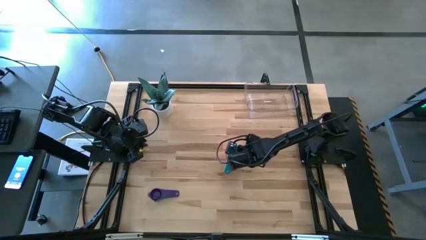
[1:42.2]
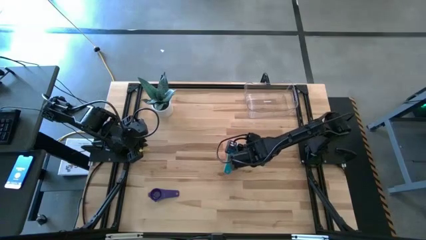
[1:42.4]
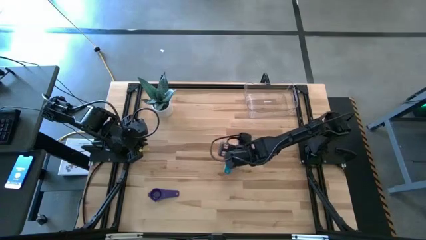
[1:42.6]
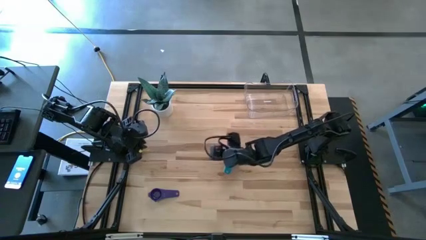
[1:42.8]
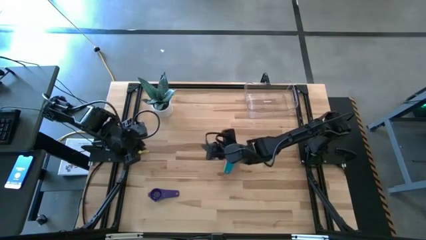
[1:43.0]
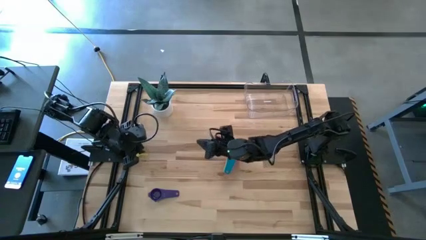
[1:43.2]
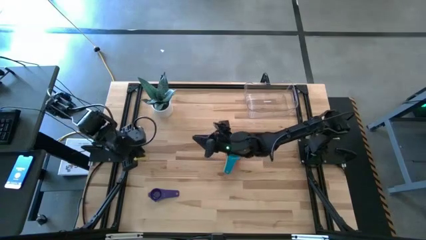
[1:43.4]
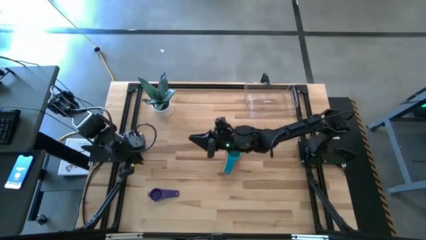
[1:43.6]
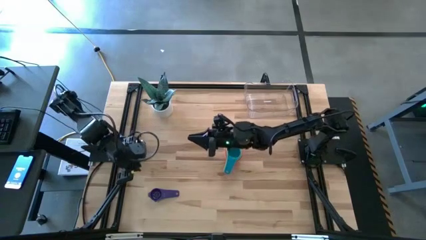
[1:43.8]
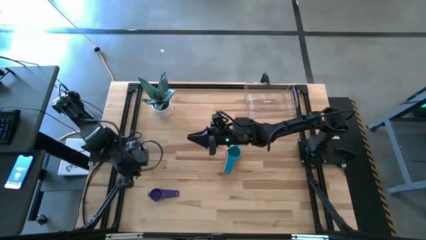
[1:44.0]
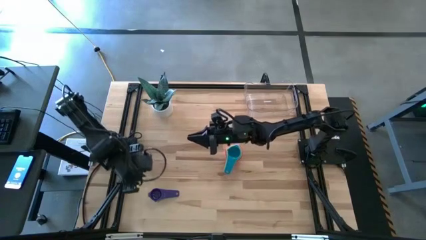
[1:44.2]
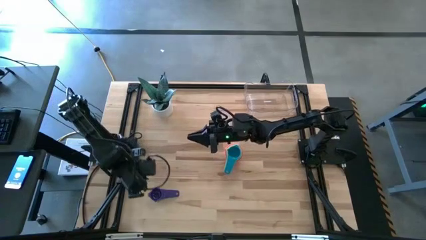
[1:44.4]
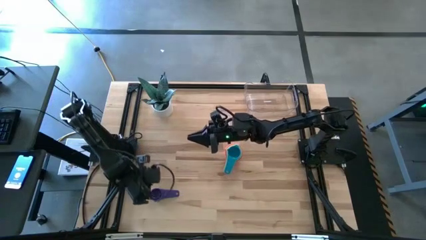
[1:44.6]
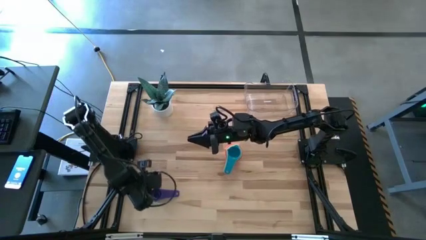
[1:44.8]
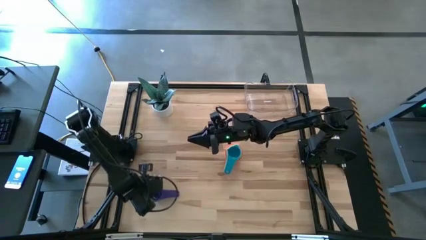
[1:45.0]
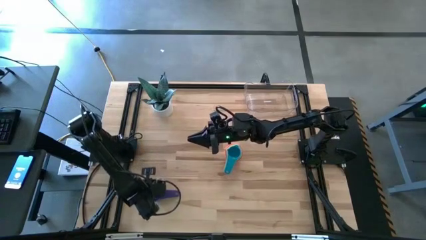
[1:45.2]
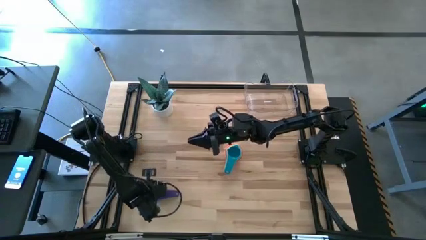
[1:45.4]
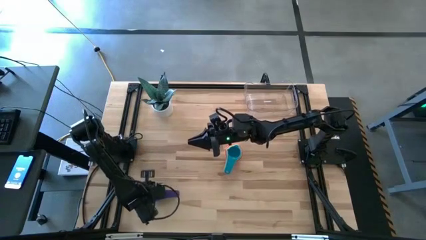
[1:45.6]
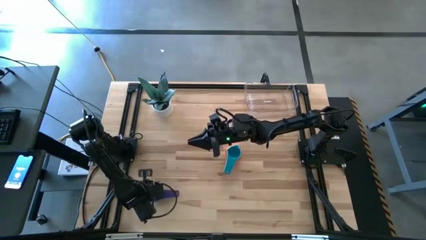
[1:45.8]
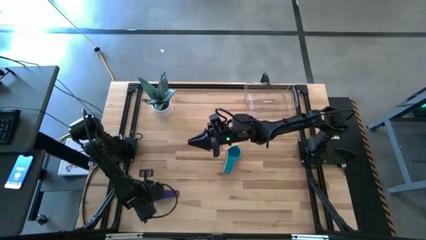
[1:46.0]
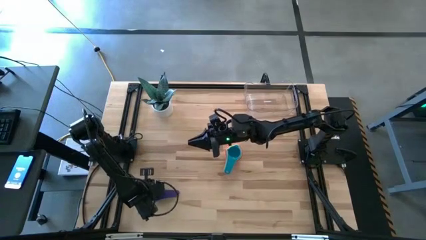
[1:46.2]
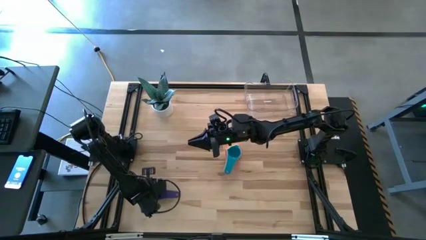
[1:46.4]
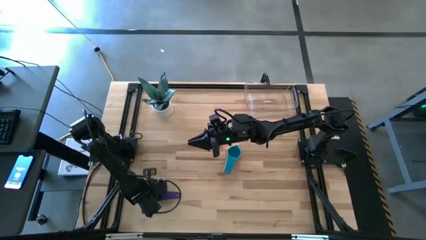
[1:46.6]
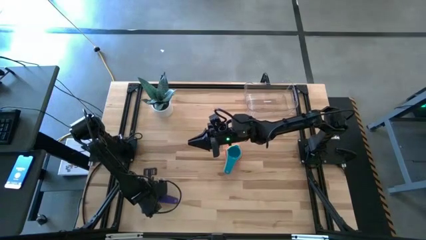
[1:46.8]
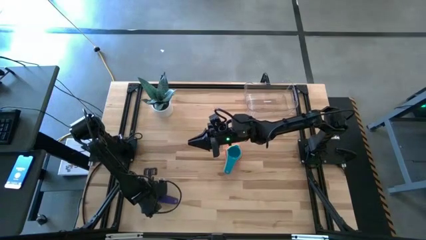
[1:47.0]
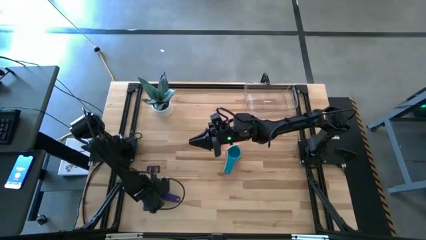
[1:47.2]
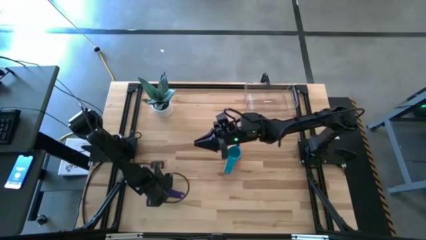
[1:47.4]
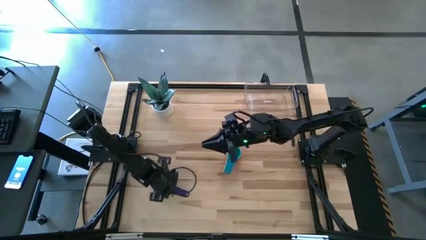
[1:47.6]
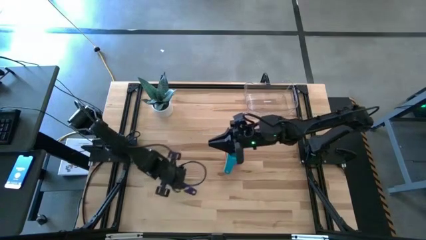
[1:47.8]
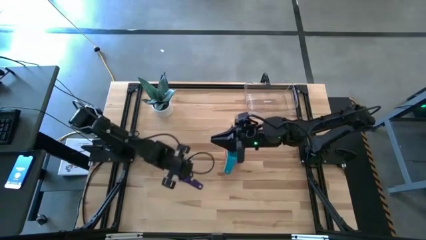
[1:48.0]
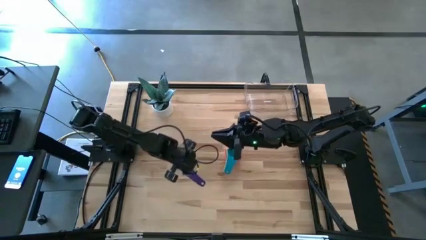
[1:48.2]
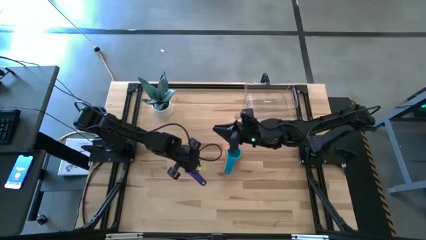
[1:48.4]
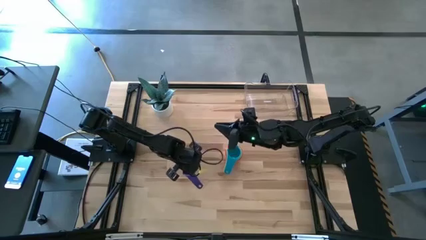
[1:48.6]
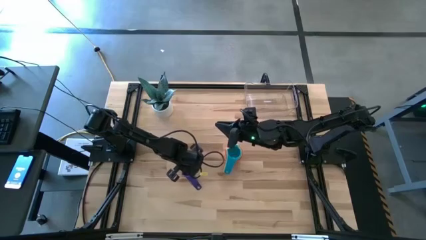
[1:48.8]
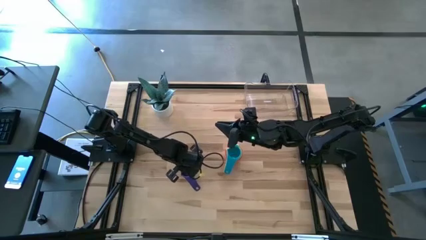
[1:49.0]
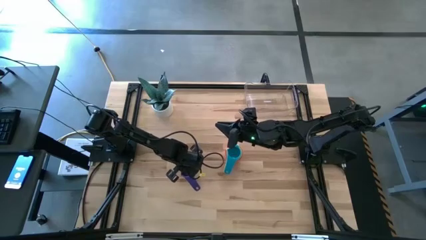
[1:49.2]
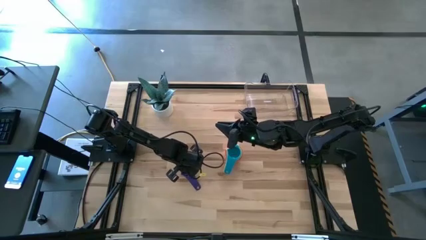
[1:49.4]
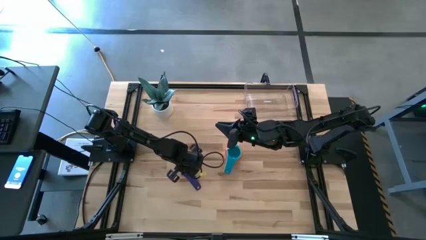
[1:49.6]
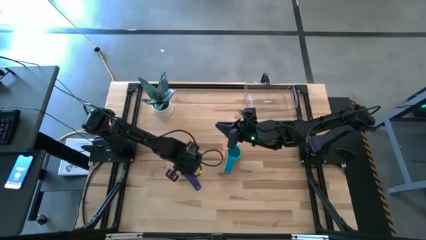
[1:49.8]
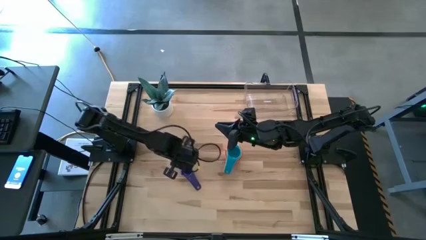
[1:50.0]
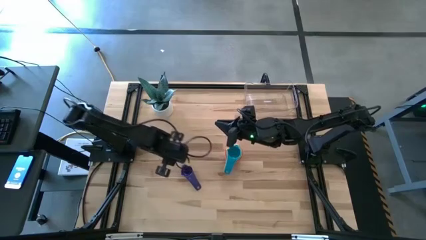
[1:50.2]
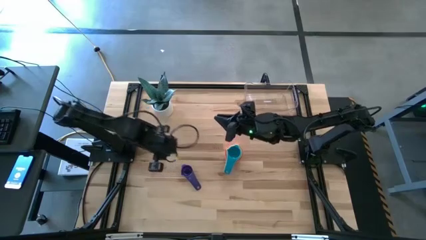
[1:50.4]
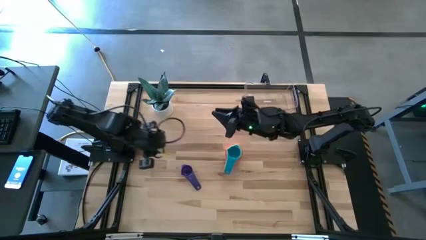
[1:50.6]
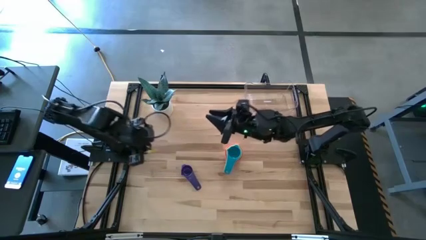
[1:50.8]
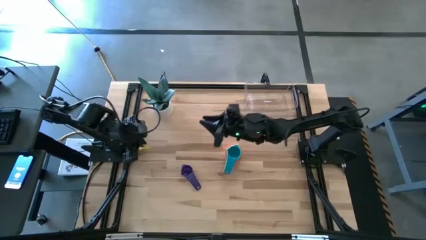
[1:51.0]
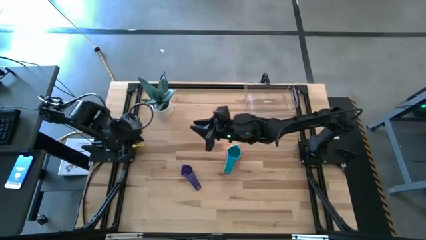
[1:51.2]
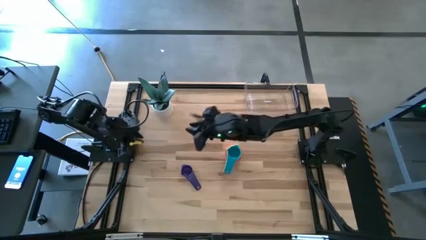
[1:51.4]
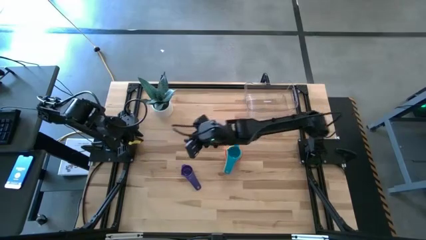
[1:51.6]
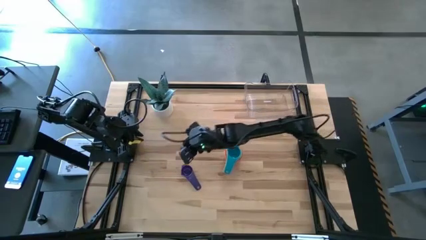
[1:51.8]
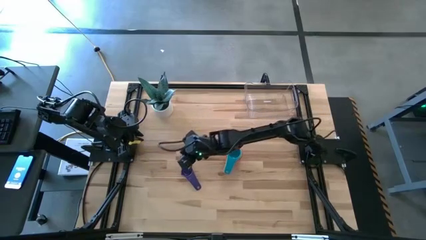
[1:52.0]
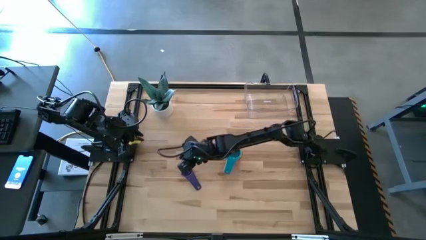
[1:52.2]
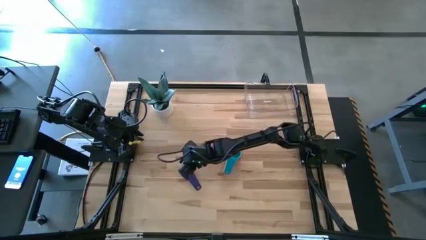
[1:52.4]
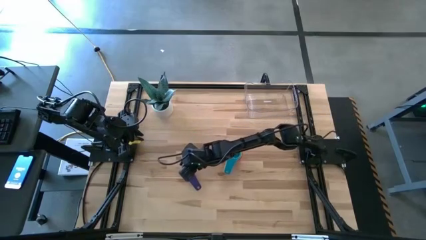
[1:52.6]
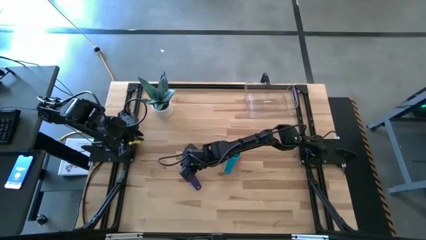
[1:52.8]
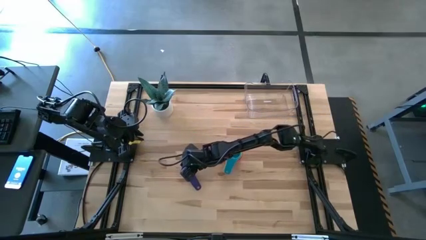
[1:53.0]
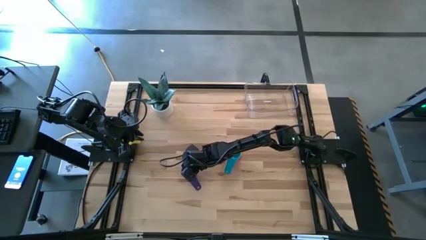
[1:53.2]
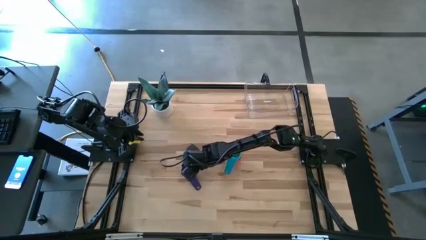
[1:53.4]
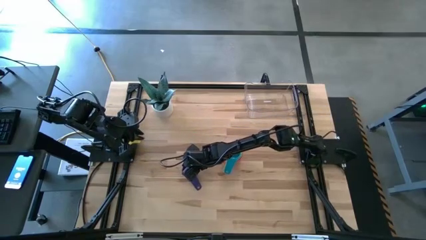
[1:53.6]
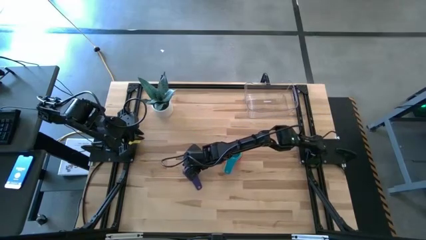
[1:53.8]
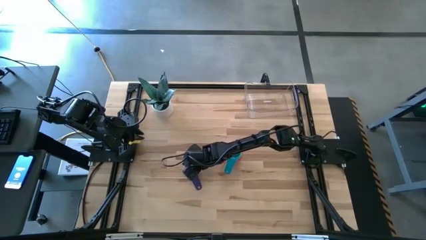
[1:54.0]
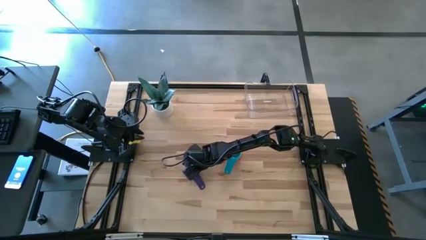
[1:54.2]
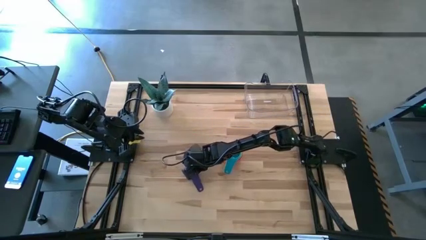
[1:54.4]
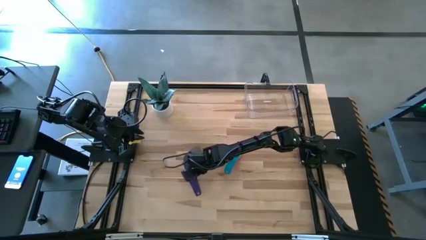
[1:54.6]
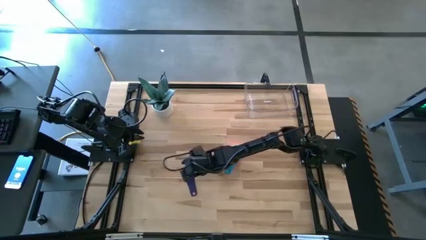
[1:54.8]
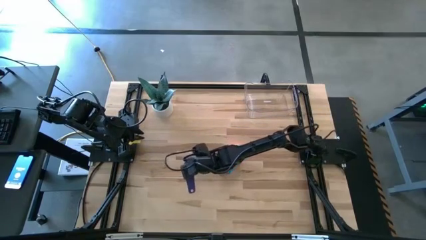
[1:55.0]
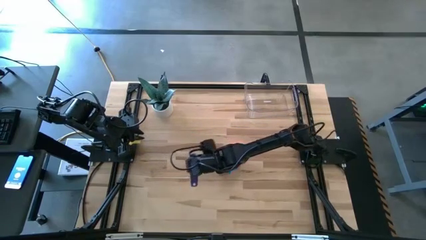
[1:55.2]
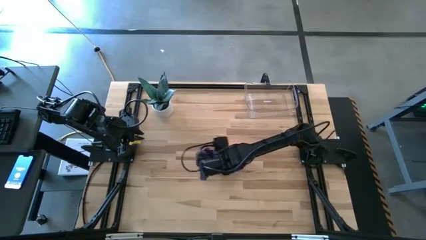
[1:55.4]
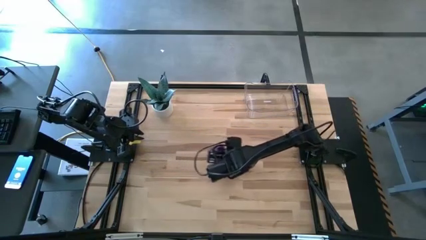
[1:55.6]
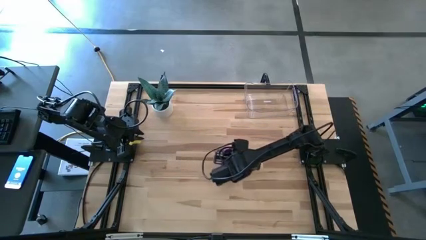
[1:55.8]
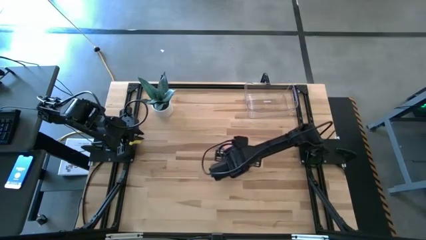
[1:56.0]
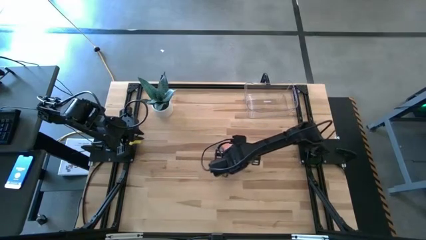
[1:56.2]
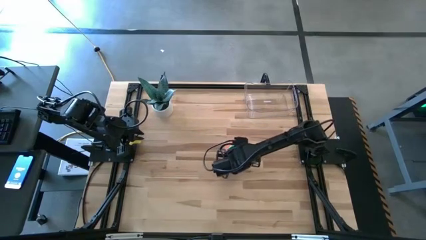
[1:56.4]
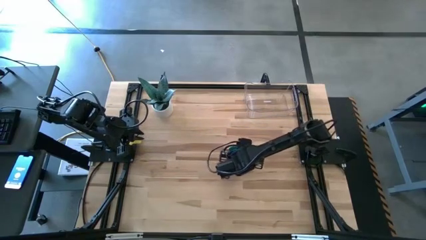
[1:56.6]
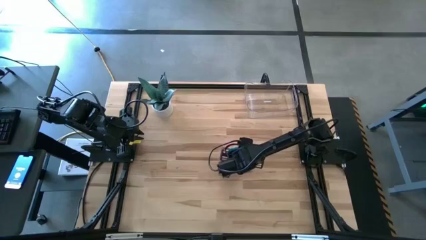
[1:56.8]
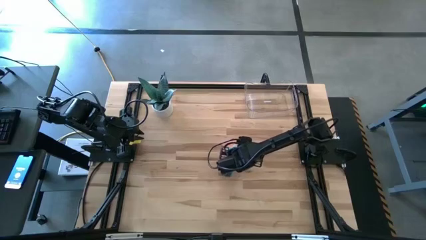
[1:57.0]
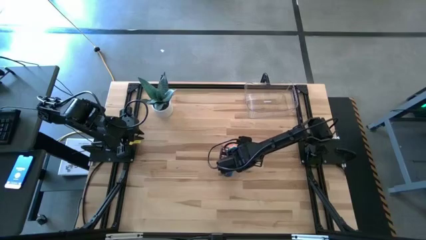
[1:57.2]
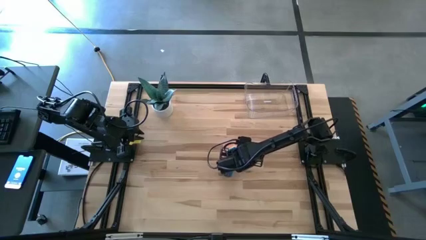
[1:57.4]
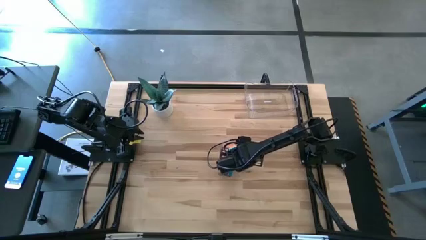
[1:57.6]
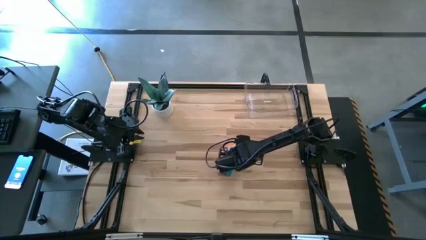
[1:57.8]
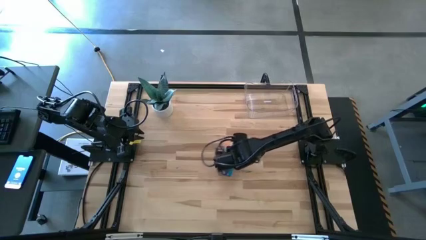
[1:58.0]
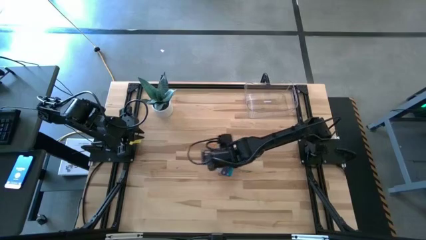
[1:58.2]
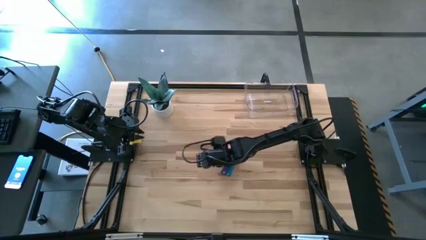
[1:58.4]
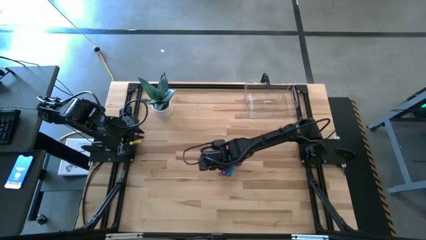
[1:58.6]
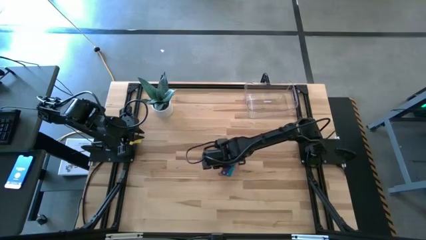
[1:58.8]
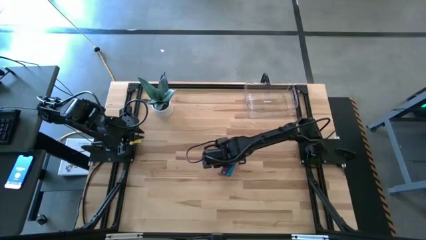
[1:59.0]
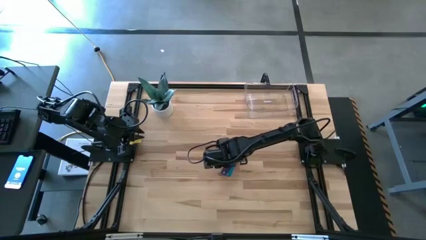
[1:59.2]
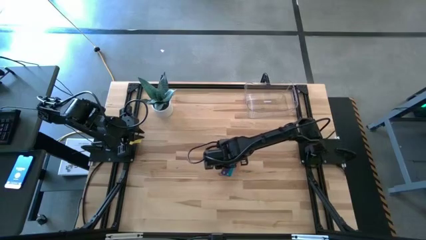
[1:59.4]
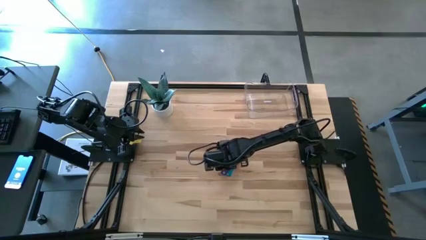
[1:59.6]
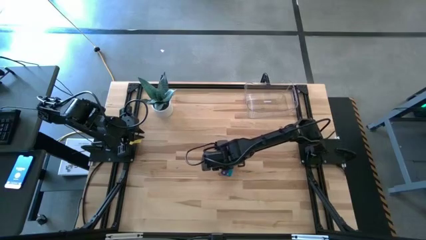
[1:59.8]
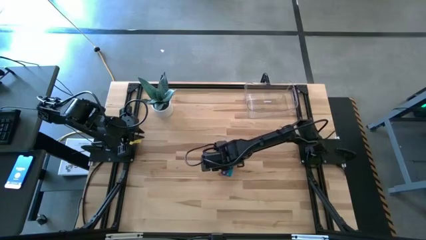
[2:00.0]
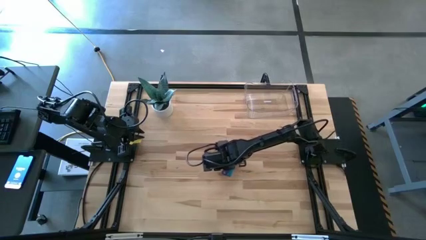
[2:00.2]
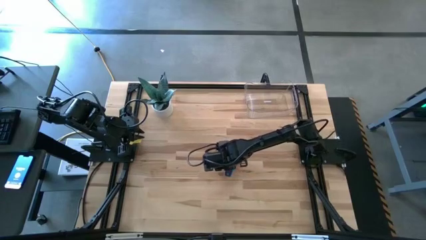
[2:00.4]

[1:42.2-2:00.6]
Task: Nest measuring cups in basket
Stack the purple measuring cup on top of the light blue measuring cup
